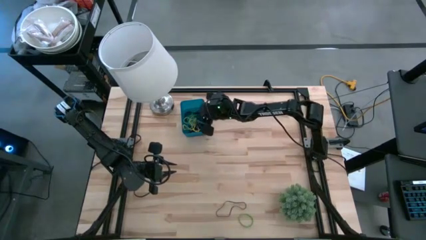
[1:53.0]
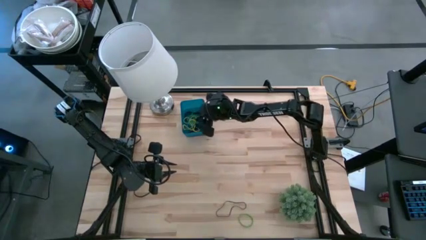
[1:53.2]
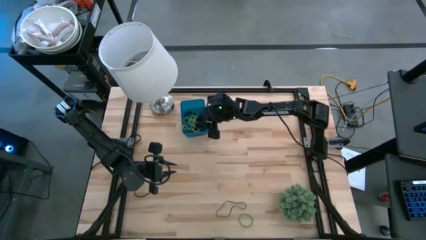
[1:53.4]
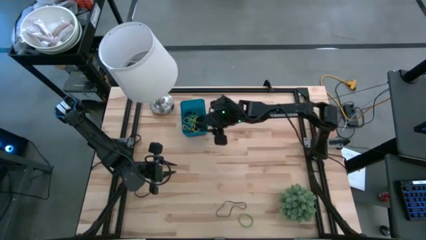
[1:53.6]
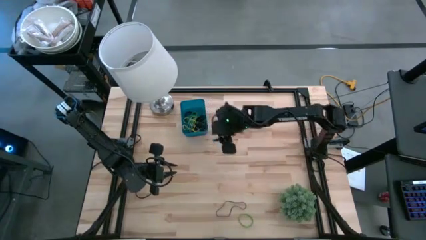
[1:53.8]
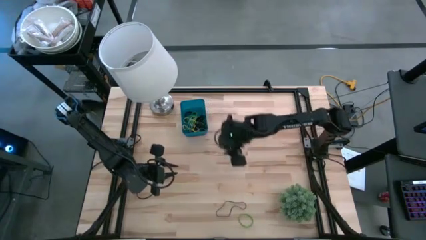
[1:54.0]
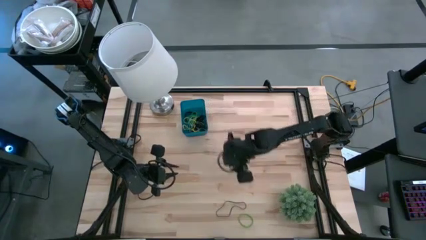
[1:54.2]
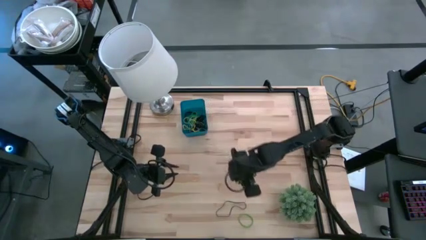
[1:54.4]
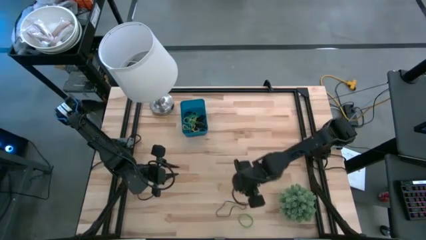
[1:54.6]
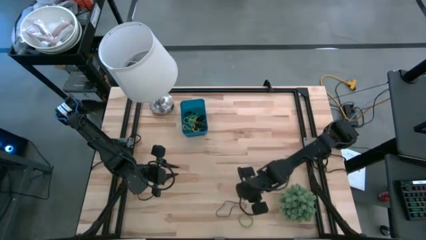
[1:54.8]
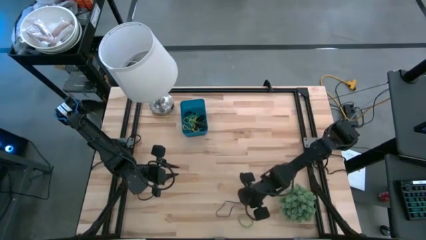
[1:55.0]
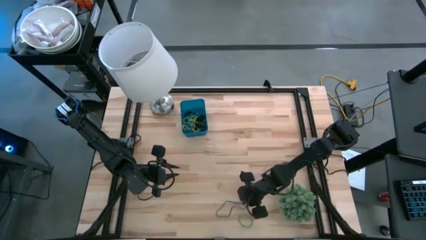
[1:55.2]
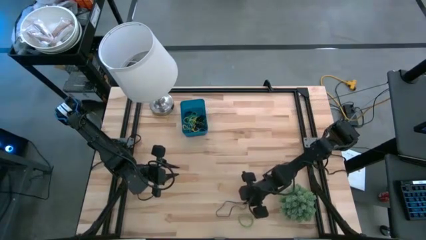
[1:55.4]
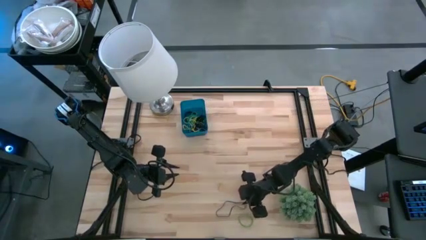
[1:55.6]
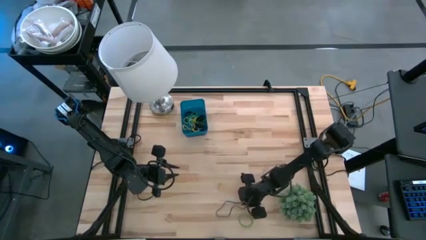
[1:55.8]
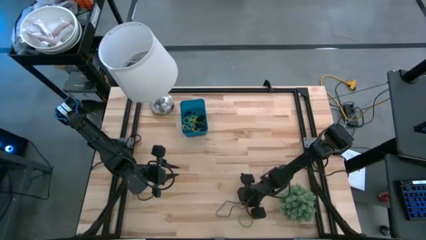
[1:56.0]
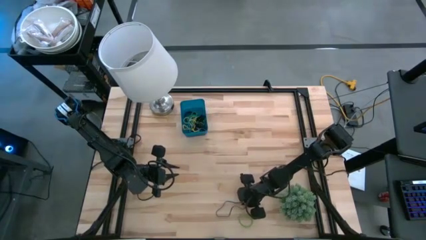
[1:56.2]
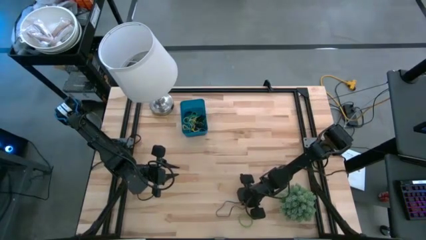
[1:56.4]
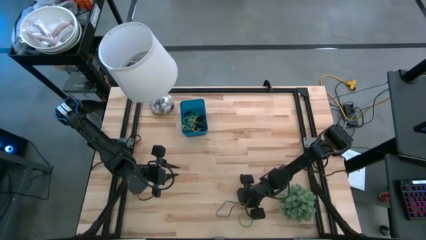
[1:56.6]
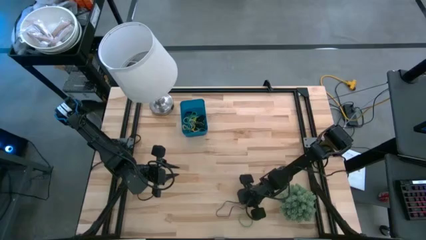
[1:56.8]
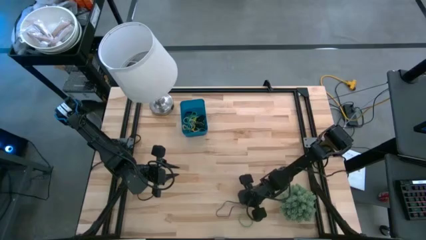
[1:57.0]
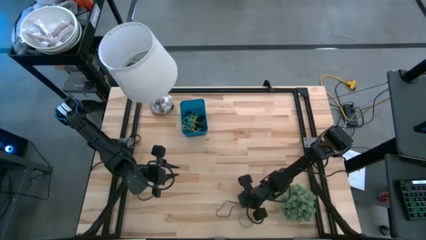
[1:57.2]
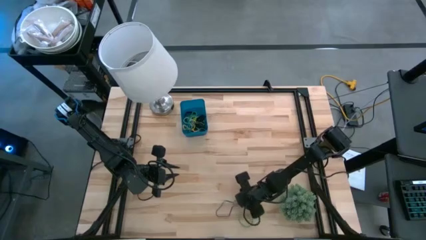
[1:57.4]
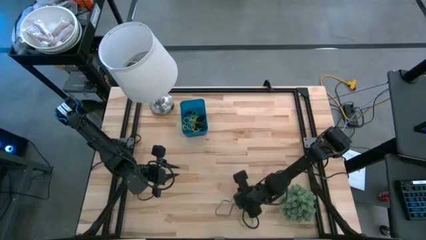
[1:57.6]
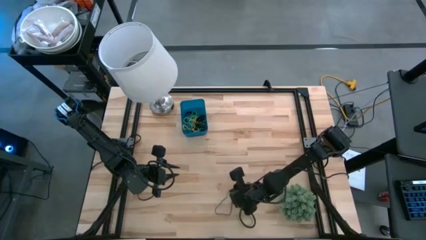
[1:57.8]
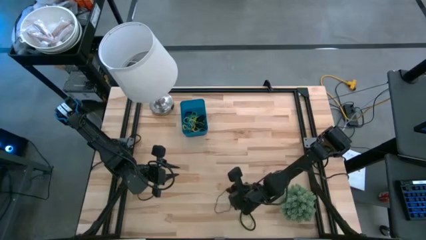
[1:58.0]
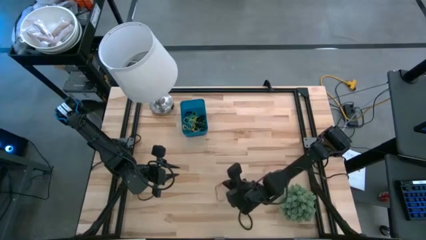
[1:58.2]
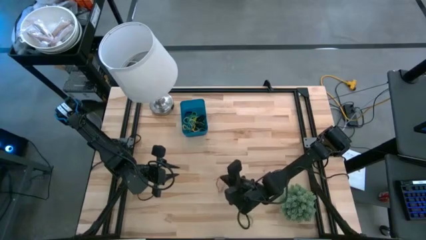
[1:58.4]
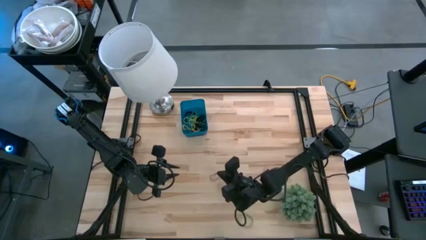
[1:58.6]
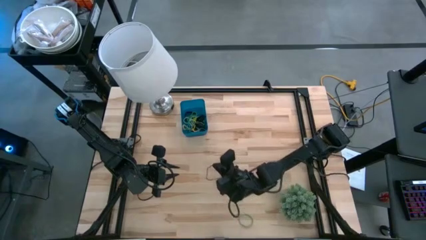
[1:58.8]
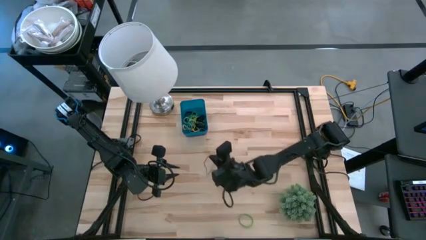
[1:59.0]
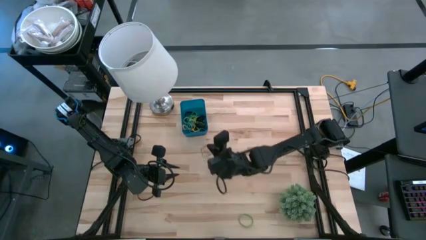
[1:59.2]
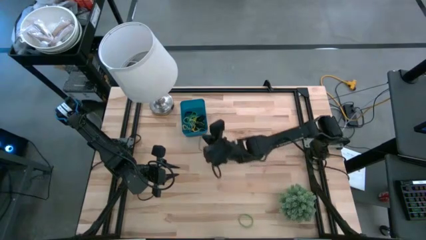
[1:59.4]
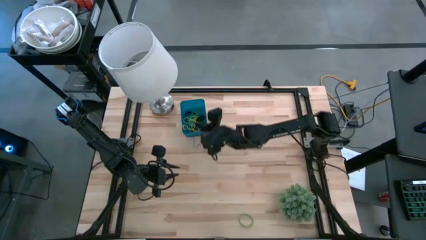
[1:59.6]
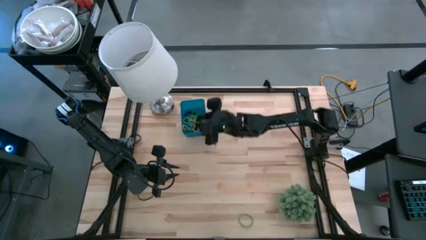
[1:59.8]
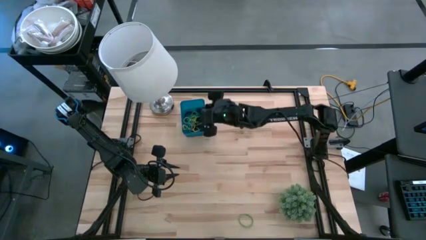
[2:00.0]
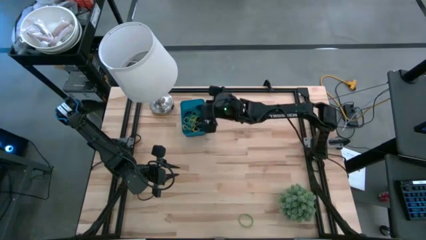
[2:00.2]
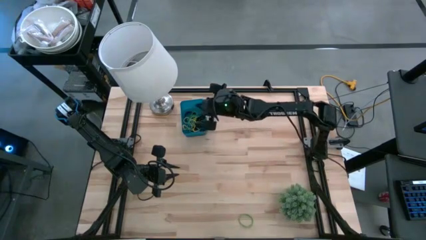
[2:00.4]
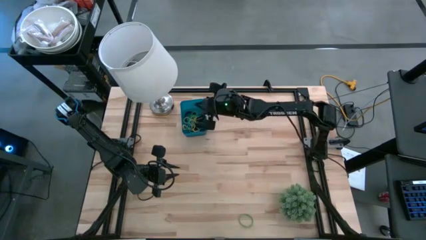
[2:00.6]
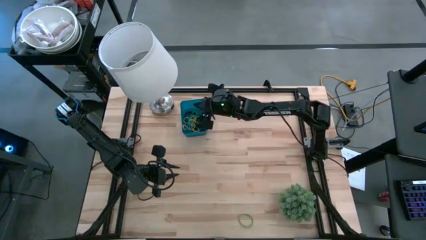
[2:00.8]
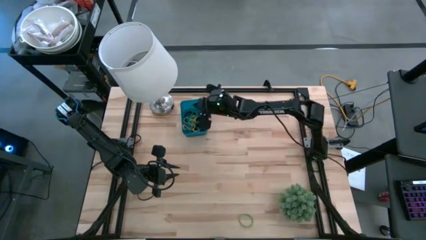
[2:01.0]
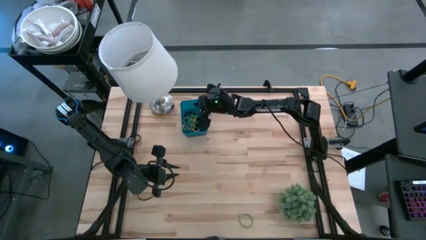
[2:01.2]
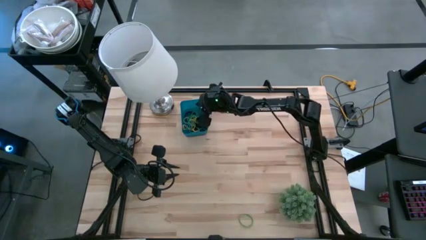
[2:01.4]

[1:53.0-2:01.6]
Task: Pick and place rubber bands into bin
Put the purple rubber band into the blue bin

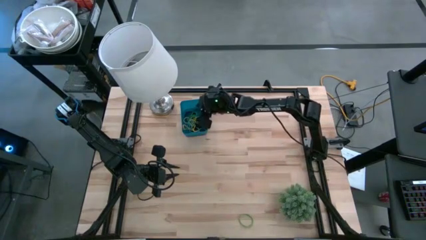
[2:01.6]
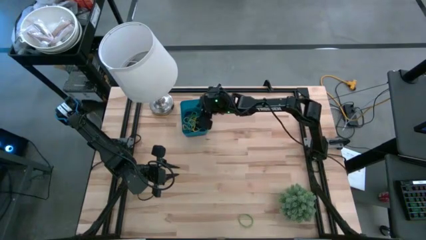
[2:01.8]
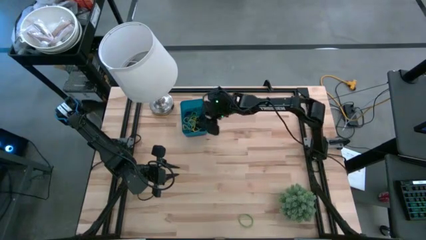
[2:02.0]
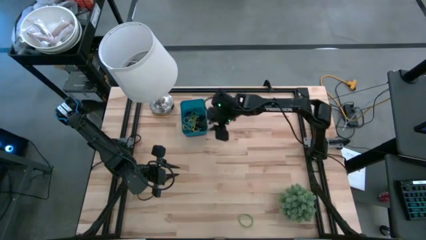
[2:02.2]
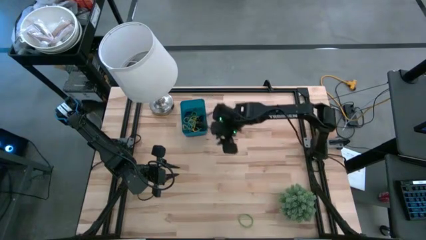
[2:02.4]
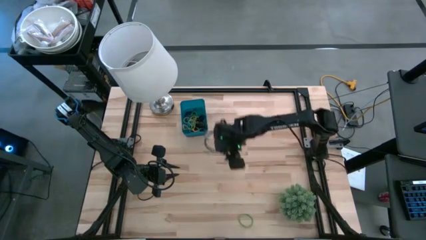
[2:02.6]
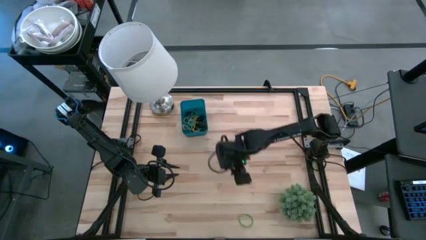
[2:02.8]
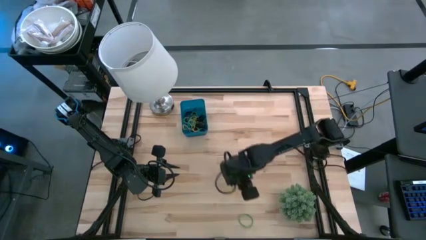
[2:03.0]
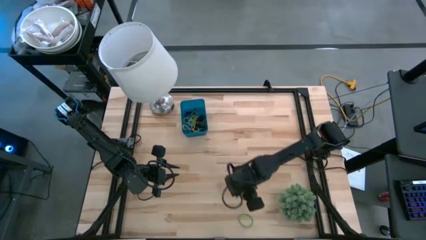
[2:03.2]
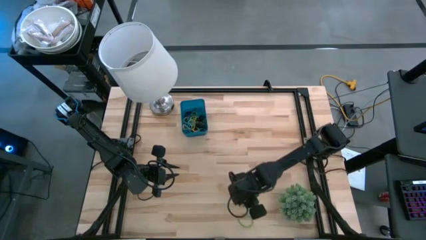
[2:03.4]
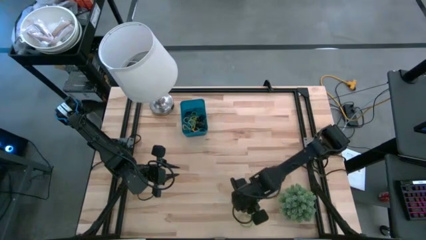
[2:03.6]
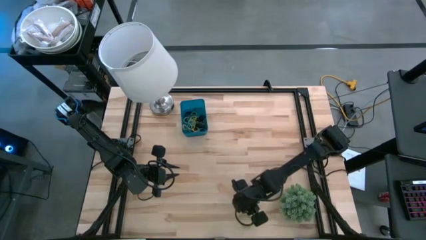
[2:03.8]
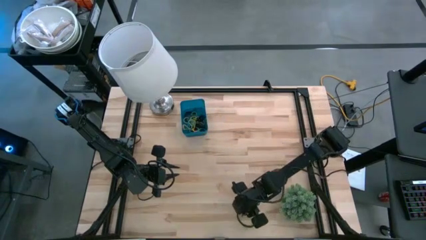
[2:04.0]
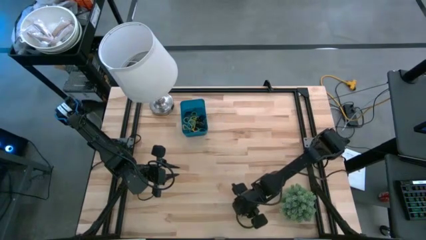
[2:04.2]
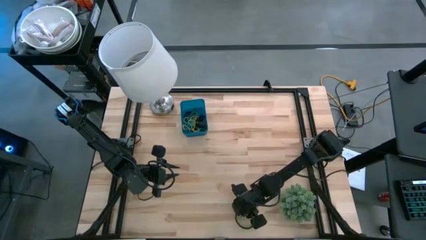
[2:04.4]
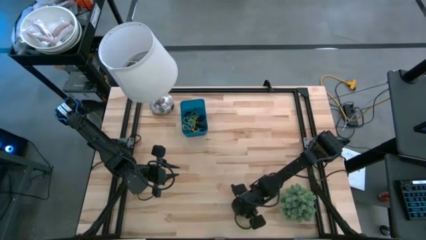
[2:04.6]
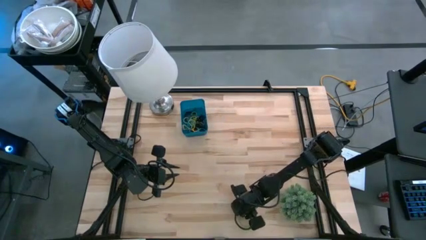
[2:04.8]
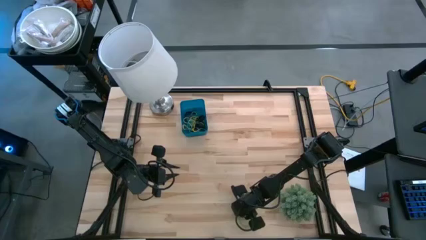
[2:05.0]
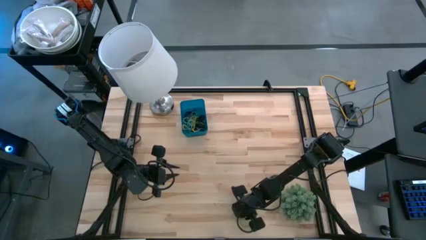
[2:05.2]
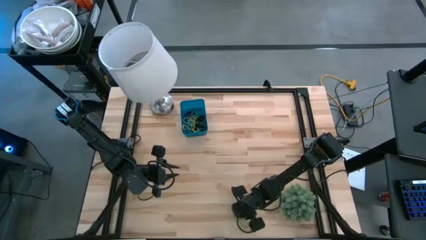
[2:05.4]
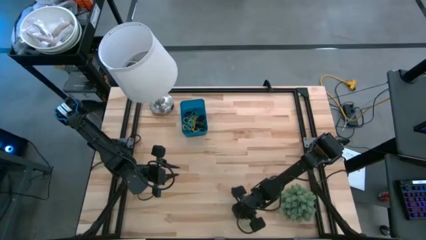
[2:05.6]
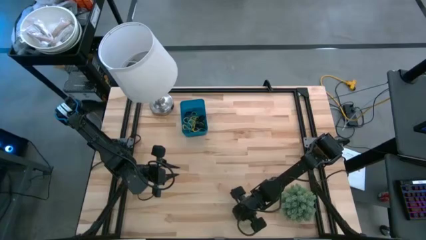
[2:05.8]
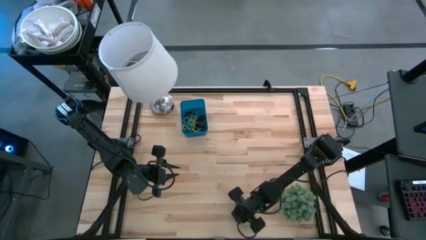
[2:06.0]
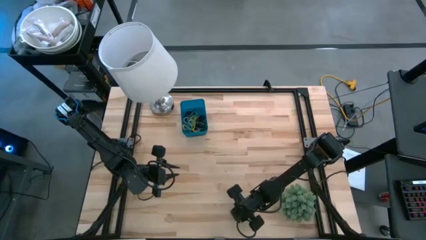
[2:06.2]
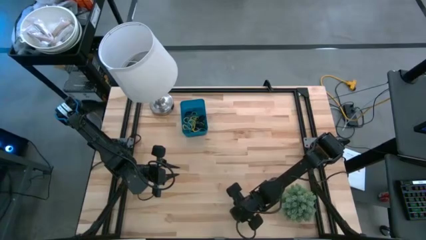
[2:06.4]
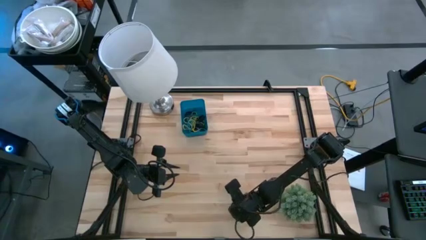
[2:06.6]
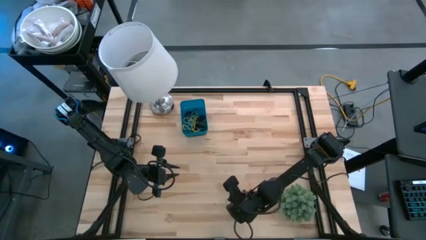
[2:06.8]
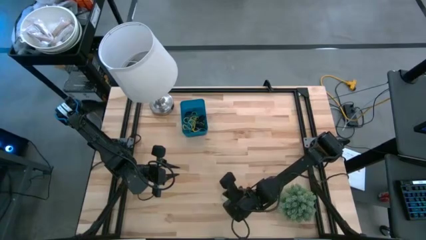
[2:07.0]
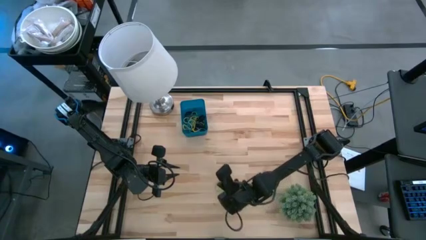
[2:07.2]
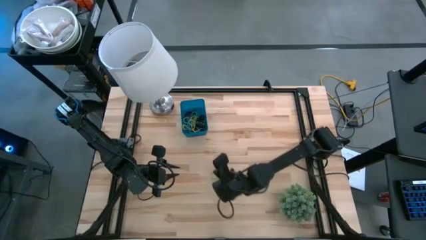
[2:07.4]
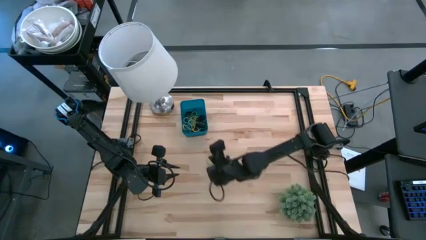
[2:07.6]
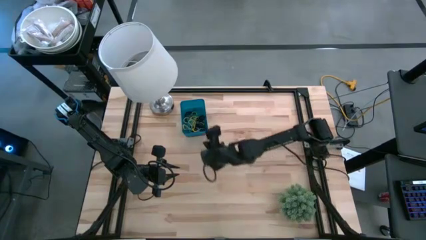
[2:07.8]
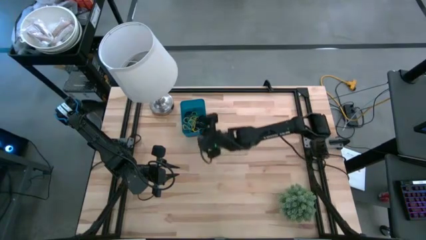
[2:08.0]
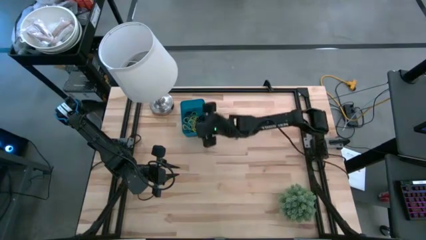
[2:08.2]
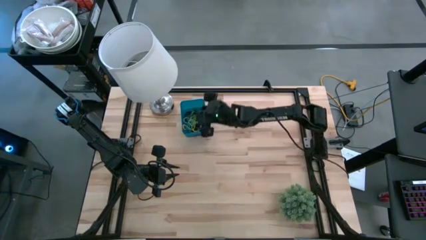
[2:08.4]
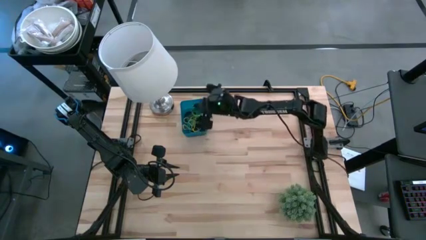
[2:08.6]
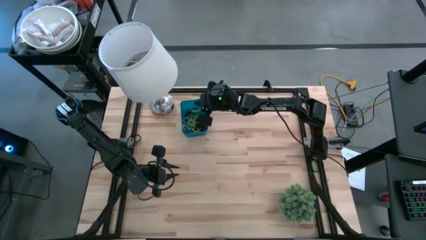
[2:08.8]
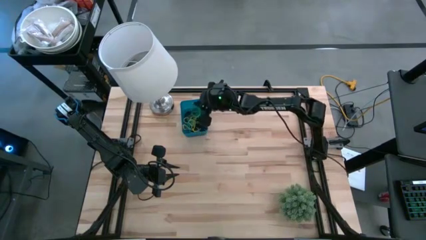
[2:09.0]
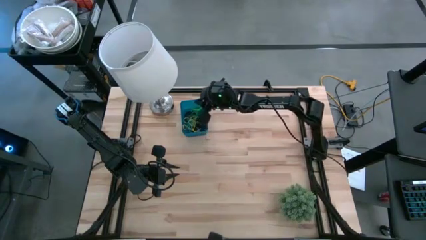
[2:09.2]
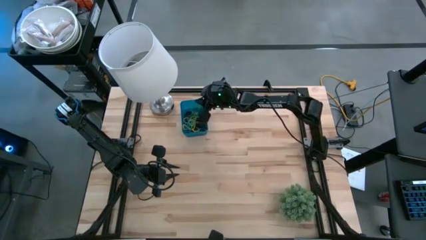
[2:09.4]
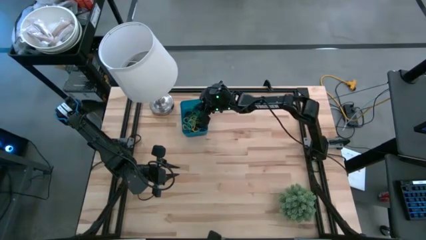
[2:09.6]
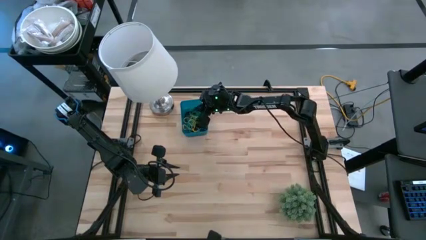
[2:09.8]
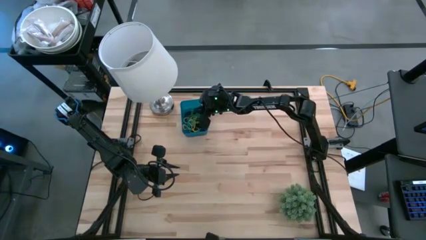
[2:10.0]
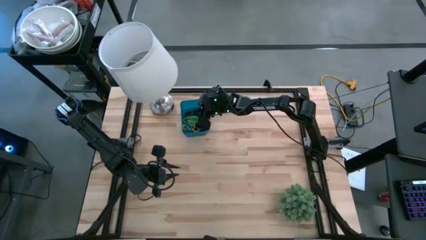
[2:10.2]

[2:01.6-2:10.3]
Put the green rubber band into the blue bin
